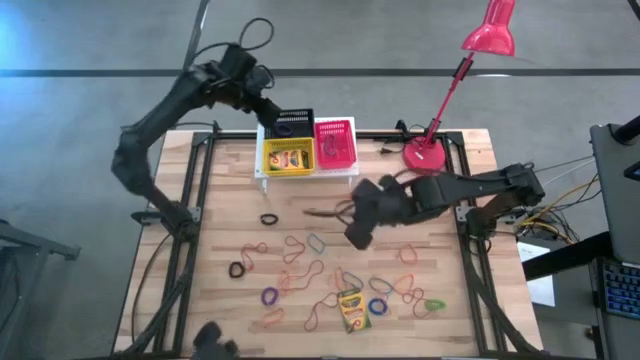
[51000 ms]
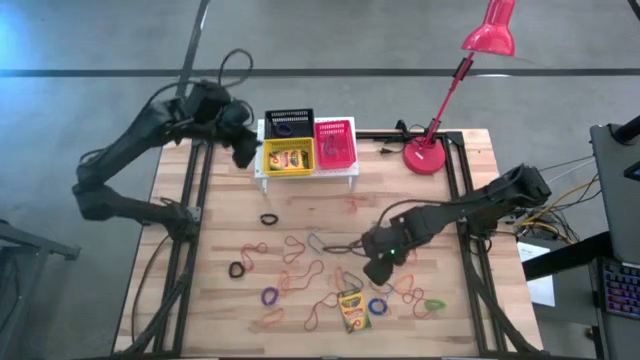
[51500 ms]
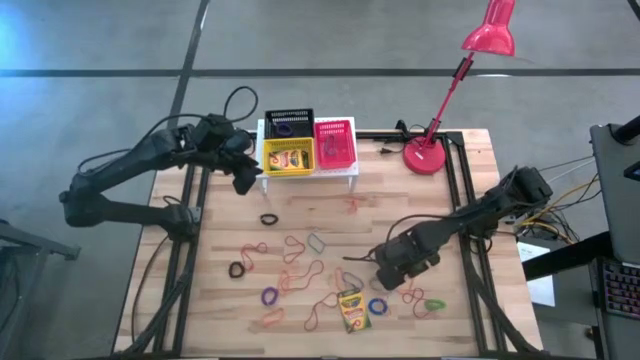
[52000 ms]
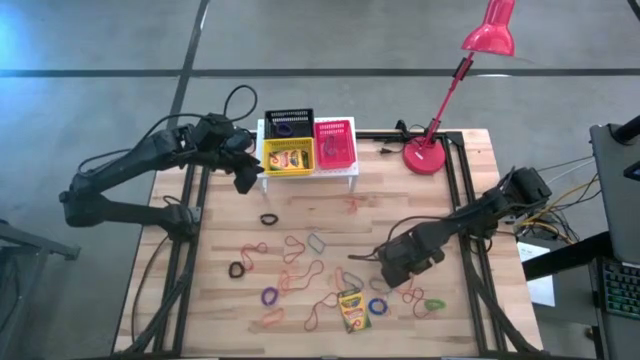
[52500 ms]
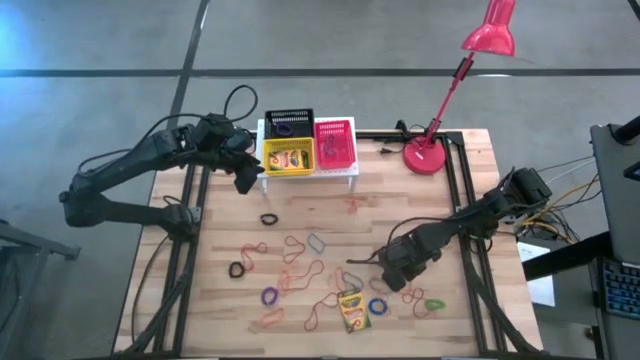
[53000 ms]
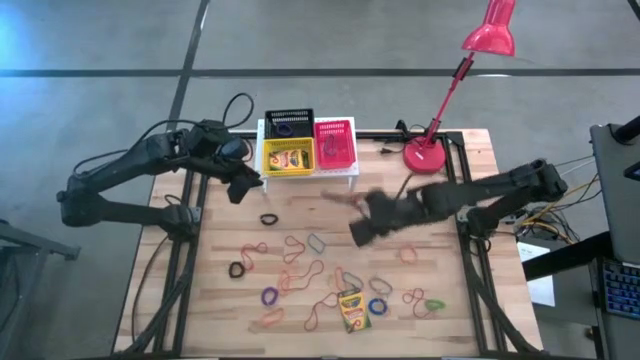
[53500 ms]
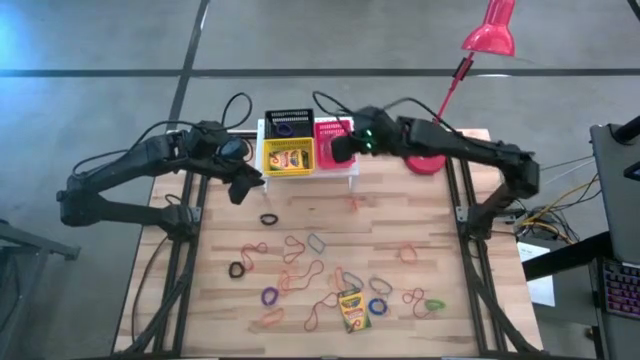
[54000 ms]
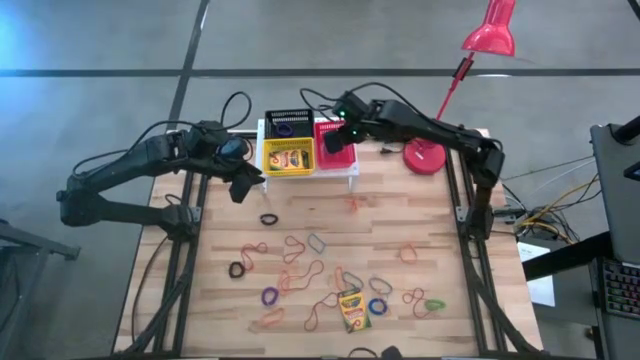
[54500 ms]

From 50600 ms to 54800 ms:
Task: Pick & Place Office Desk Supplies
Put the orange rubber band into the red basket on the shelf

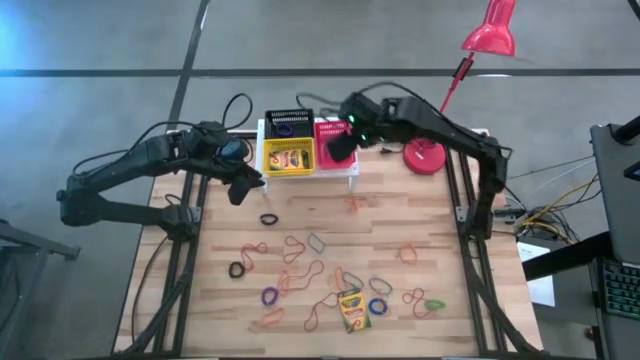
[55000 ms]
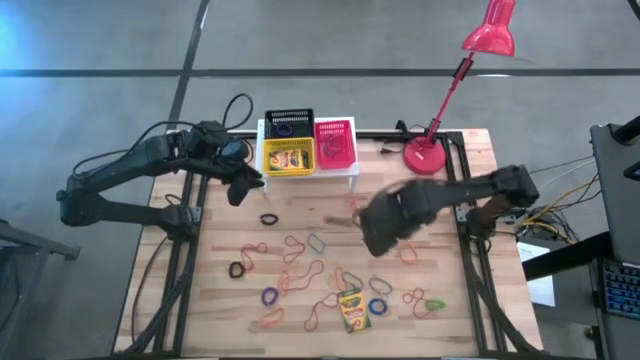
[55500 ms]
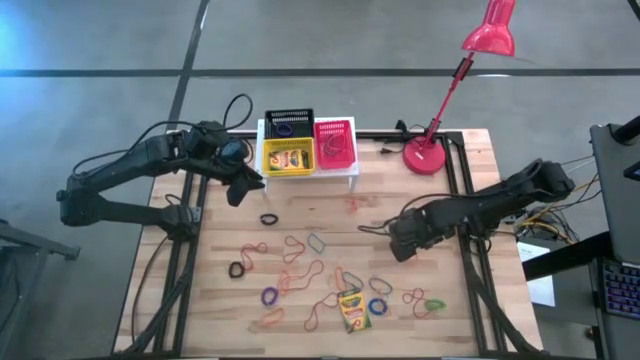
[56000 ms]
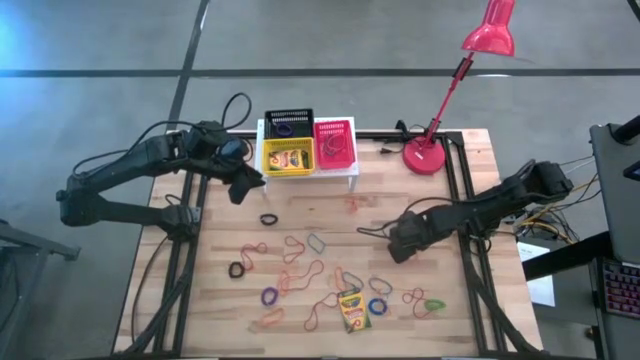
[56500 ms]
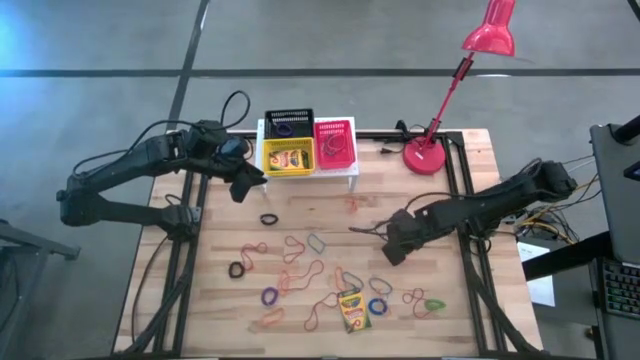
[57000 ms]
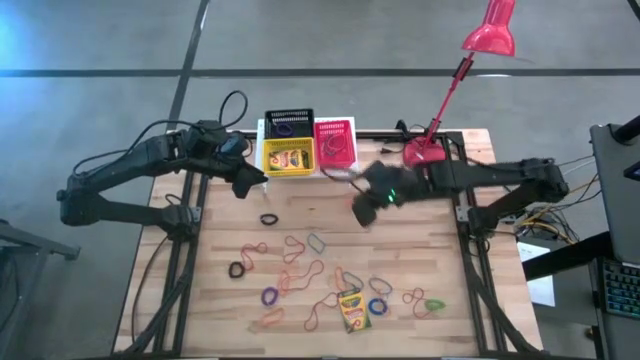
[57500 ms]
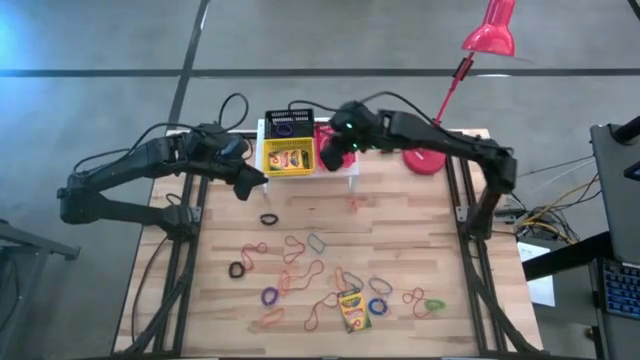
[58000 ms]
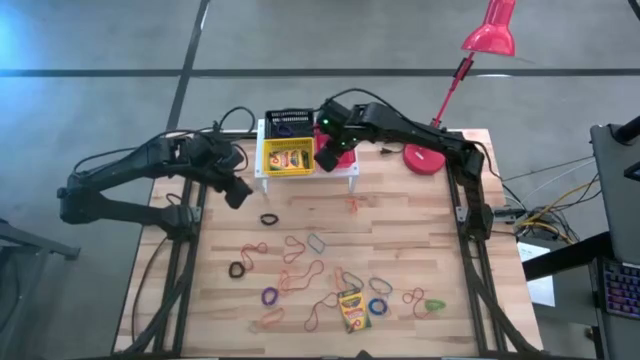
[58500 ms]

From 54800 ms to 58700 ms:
Put the orange rubber band into the red basket on the shelf

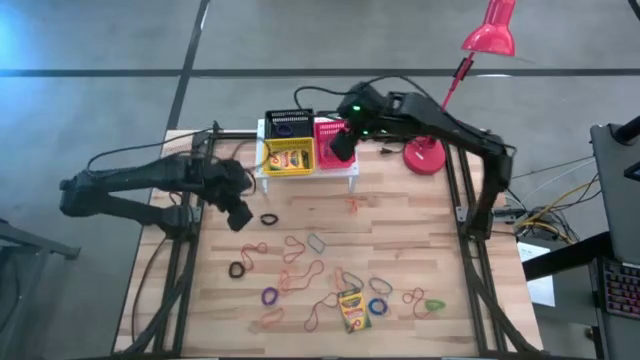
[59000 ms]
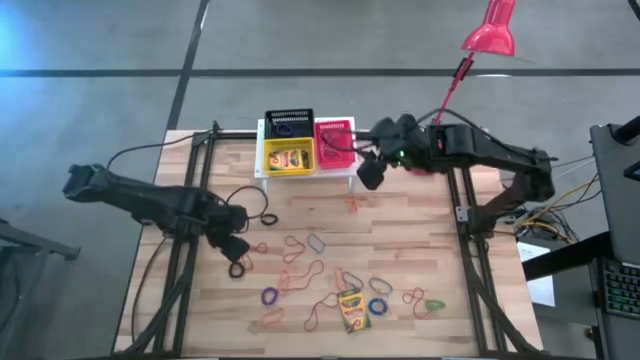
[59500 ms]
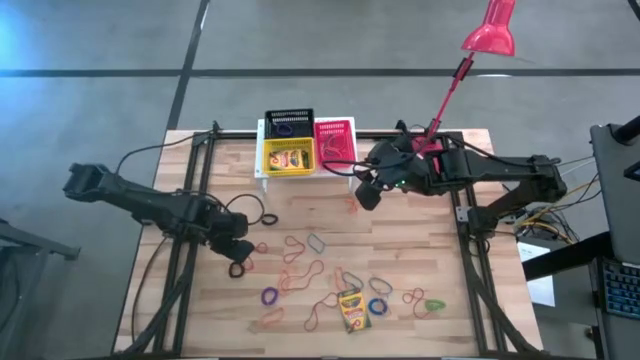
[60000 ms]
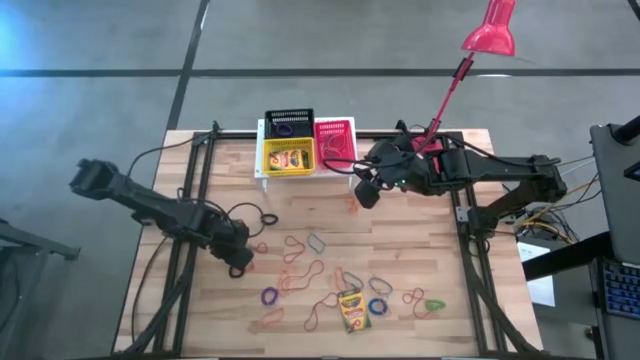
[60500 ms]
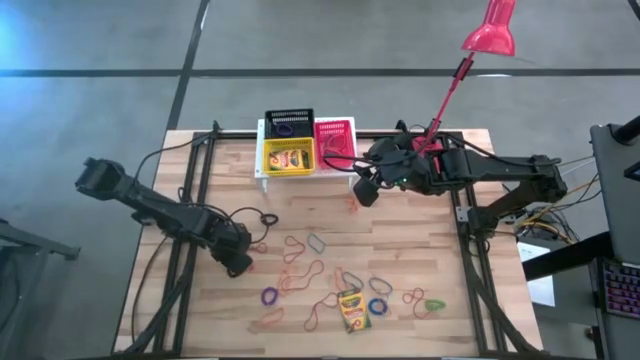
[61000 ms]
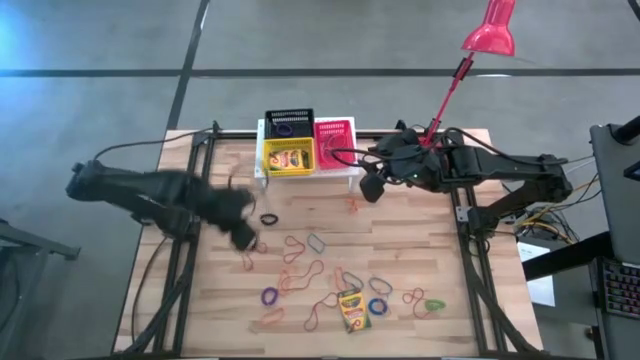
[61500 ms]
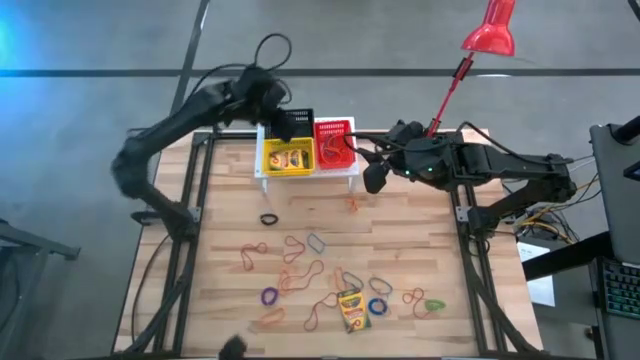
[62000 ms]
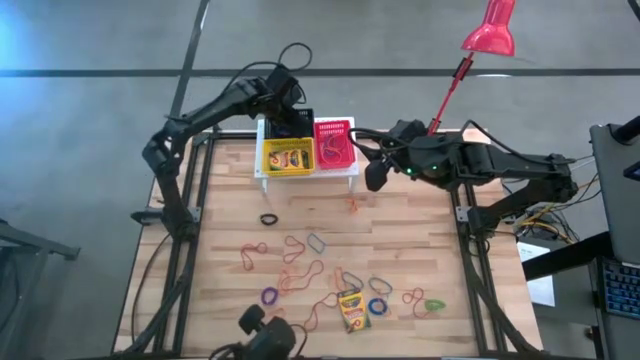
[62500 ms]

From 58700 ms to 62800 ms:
Put the black spring keychain into the black basket on the shelf

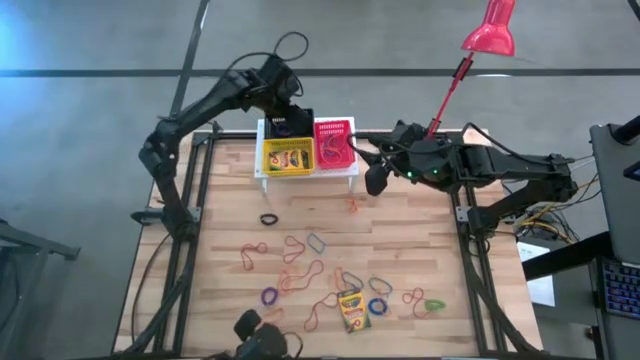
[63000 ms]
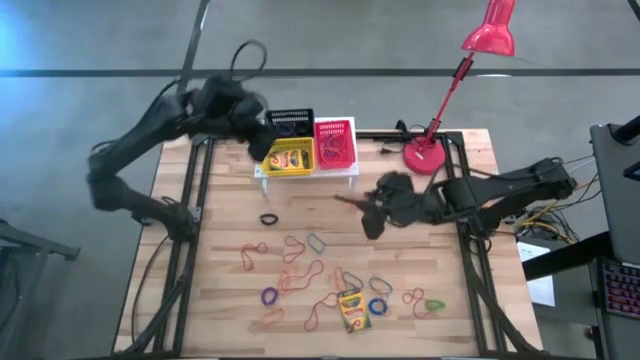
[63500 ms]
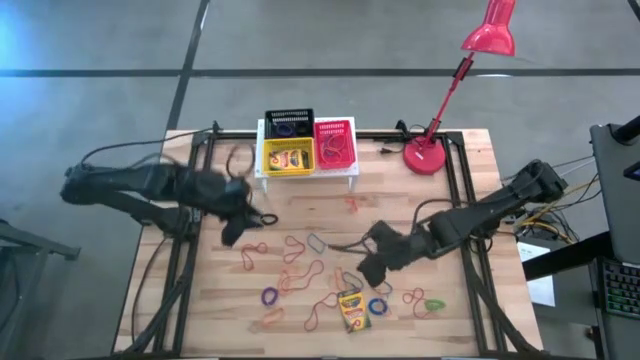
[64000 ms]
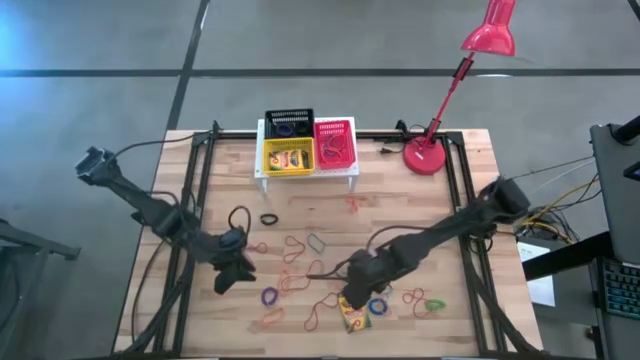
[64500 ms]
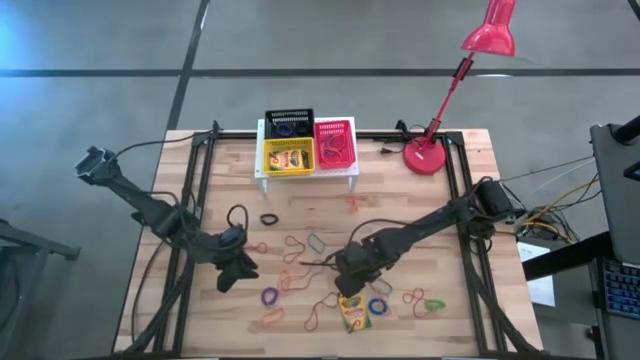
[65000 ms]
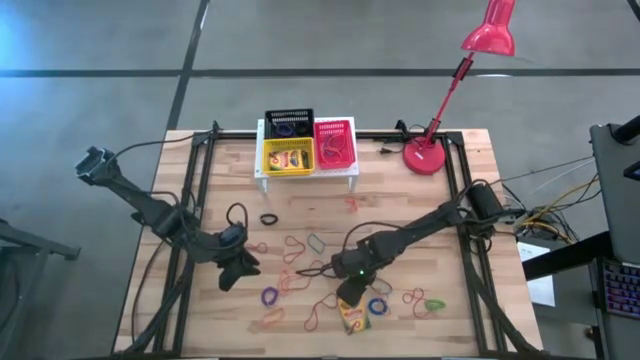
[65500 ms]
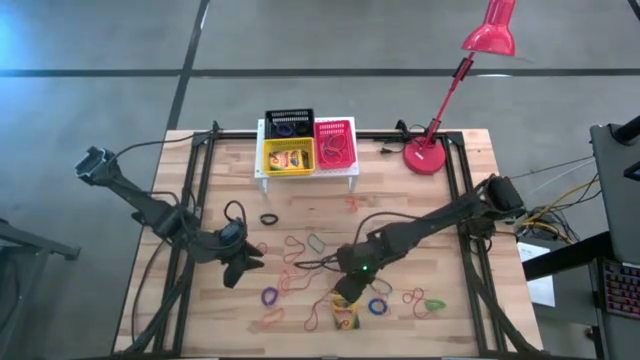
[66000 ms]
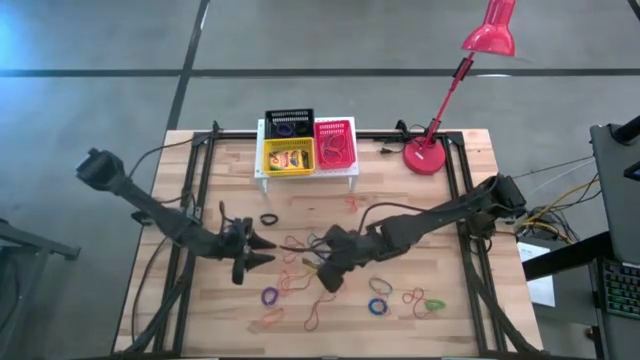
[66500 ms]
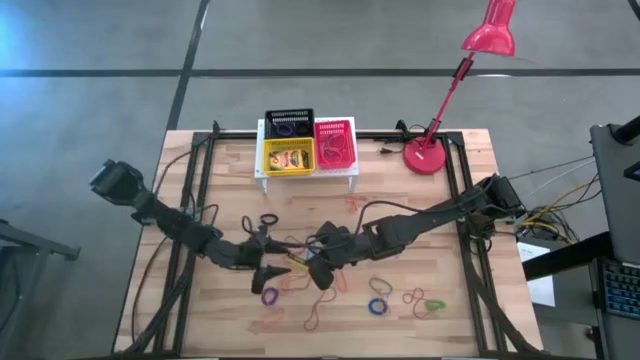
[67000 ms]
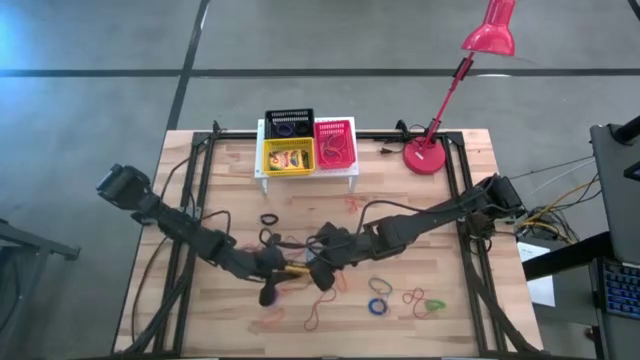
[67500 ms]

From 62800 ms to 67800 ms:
Put the yellow crayon box into the yellow basket on the shelf

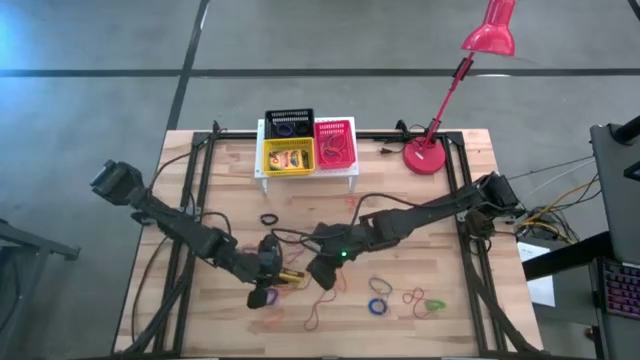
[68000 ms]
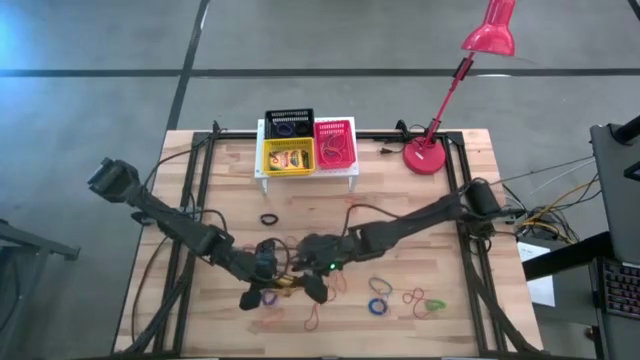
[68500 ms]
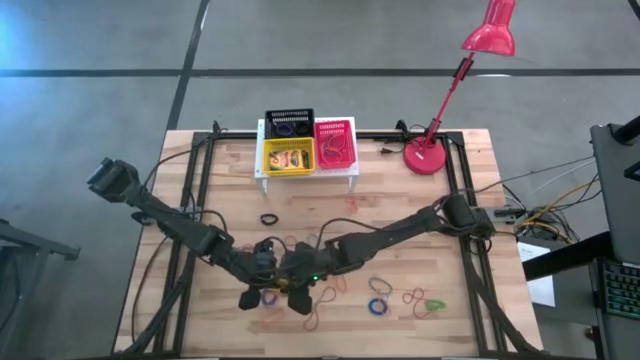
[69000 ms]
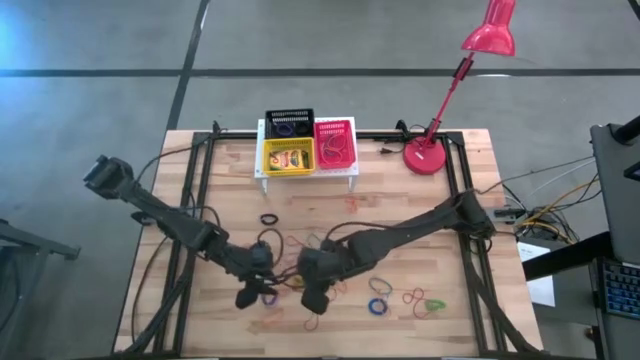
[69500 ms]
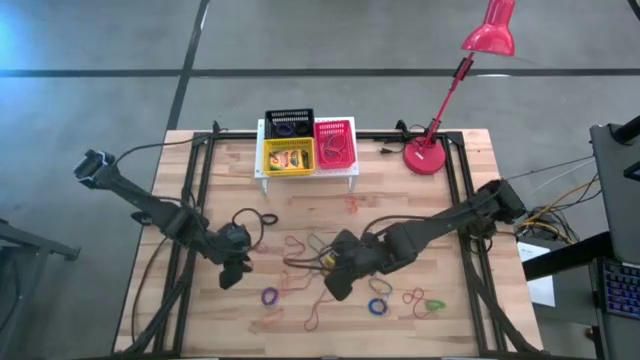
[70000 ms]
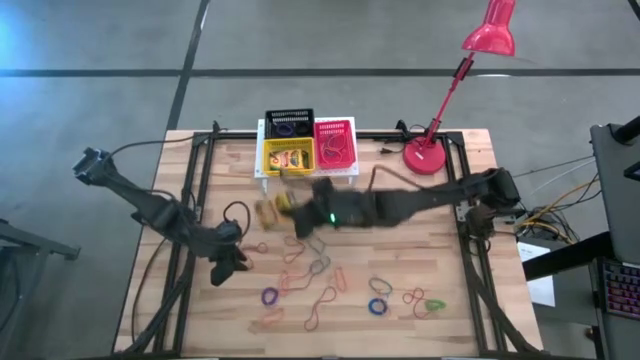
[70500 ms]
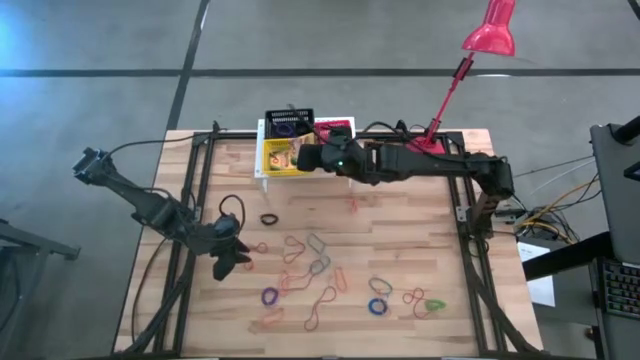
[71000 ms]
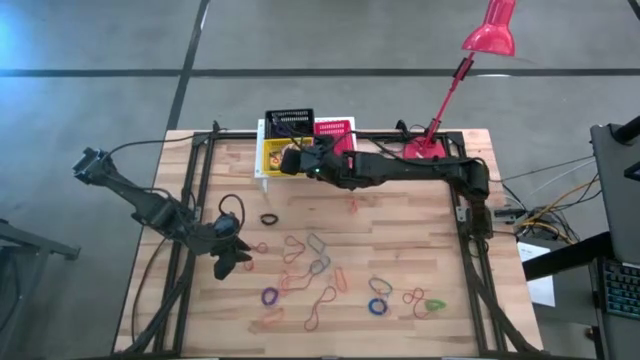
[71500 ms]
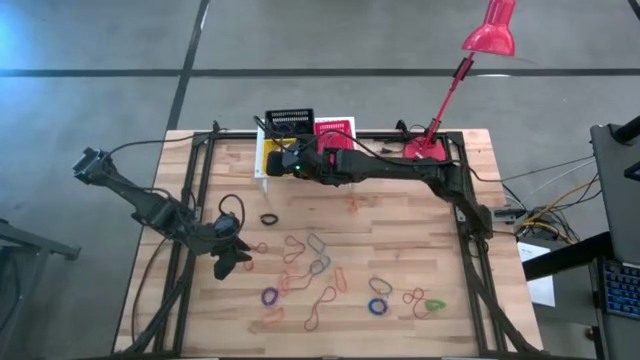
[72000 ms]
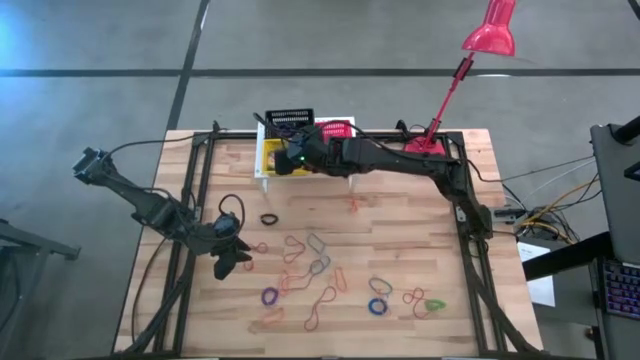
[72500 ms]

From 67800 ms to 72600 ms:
Put the yellow crayon box into the yellow basket on the shelf
